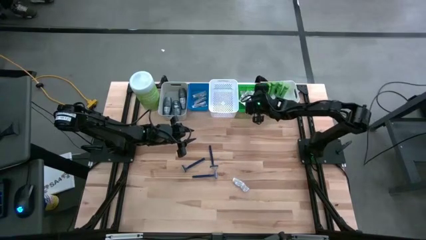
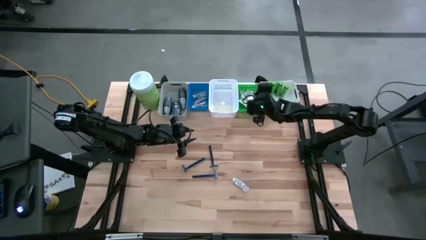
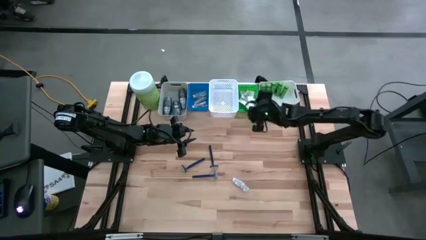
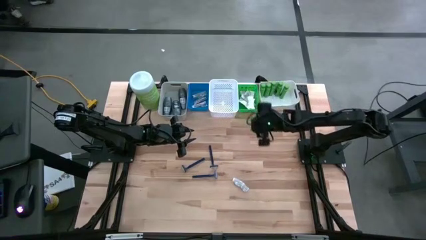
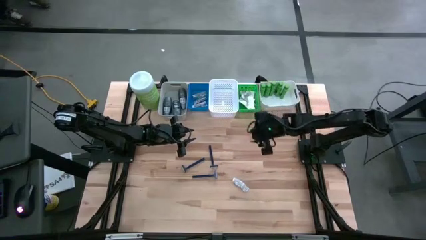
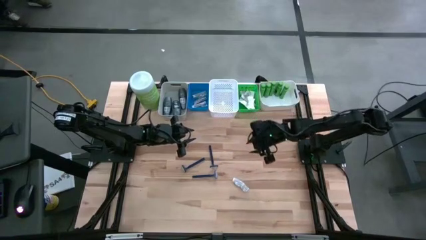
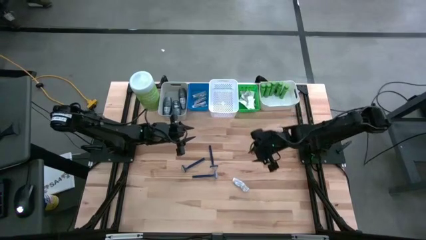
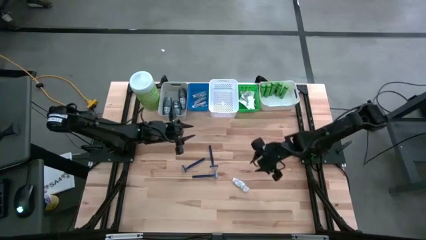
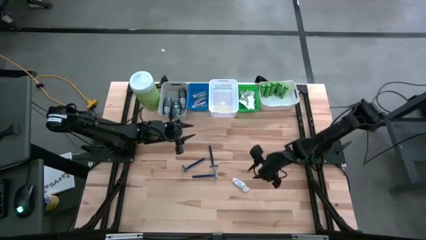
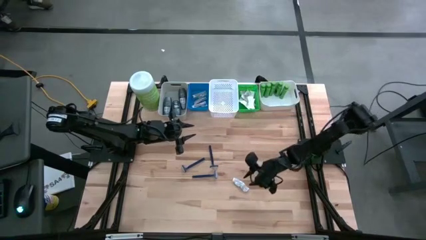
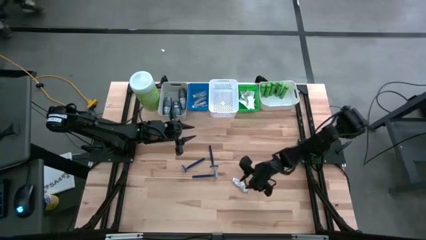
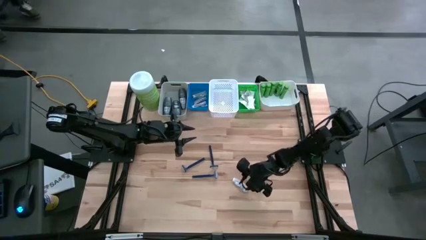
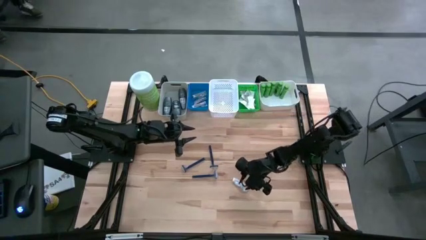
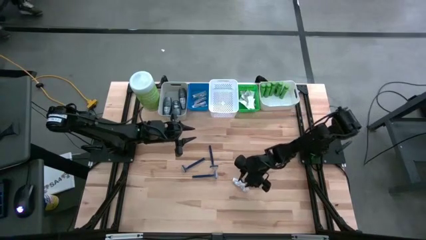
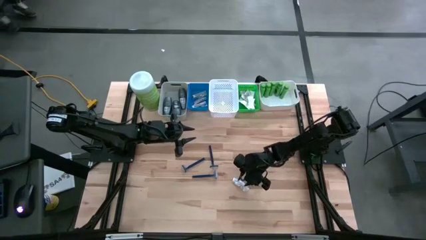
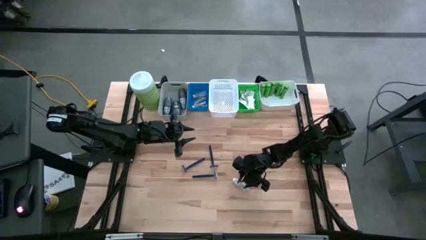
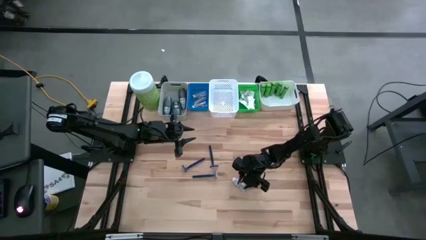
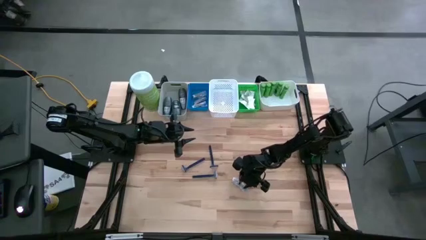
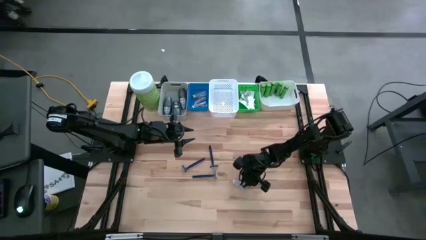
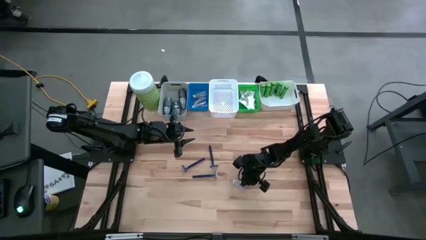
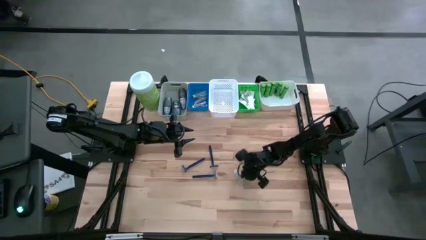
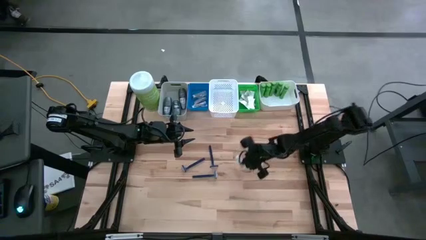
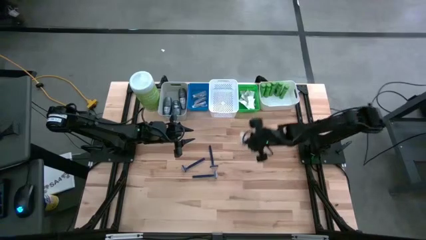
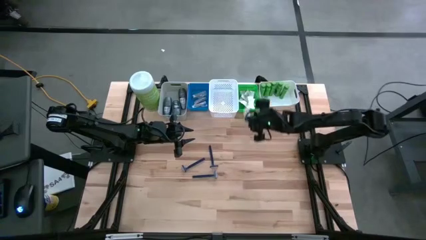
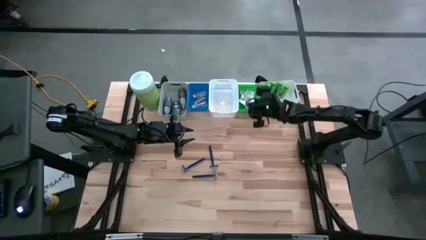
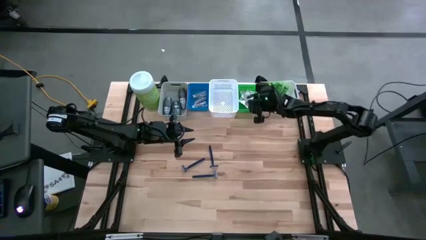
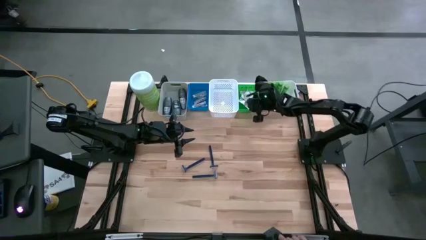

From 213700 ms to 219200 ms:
Task: Pick & Place Travel size toiletries
Put the white bandage pack into the green bin

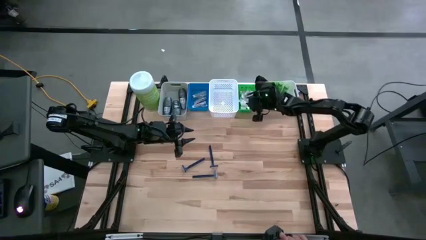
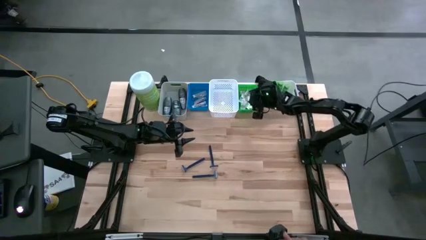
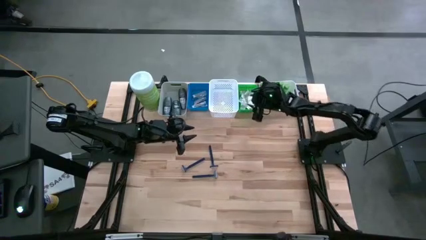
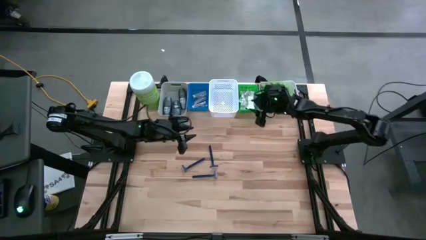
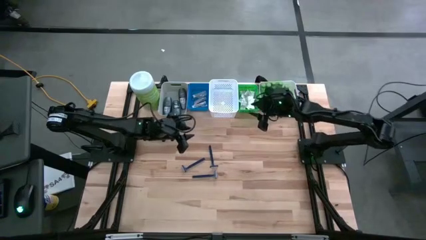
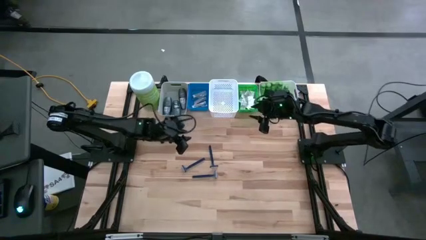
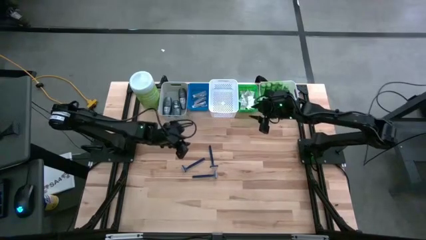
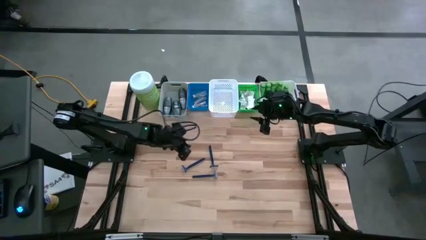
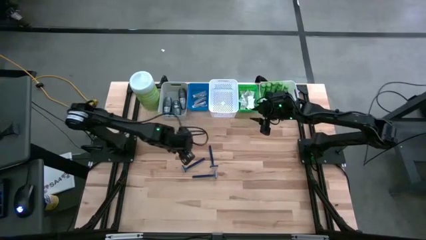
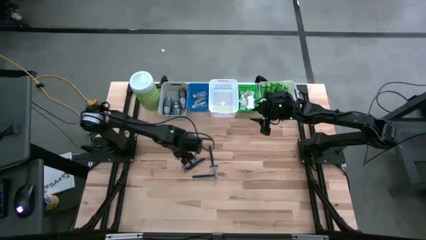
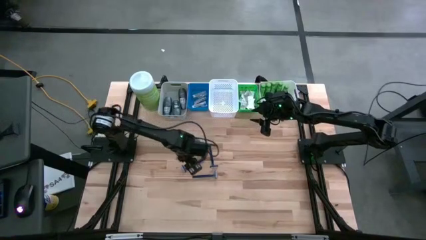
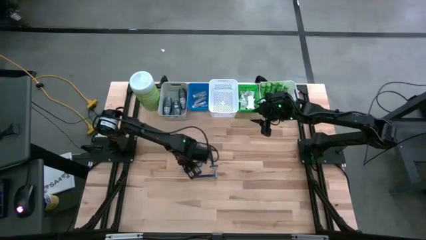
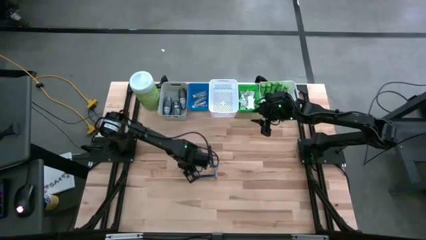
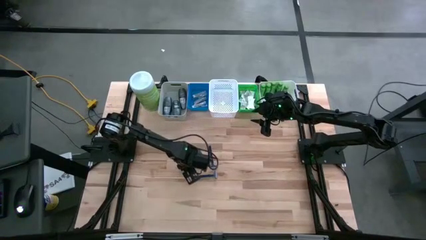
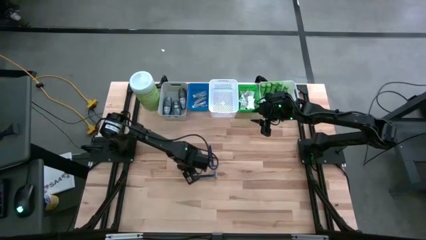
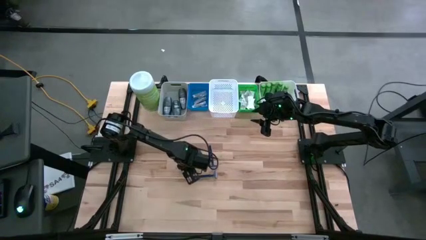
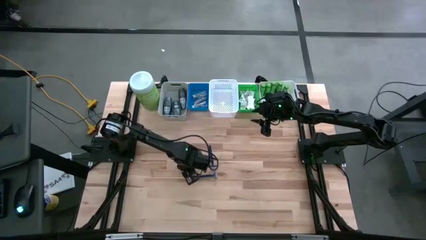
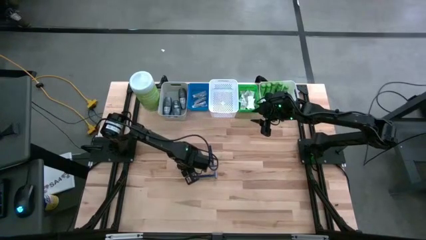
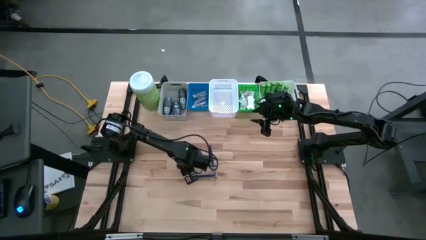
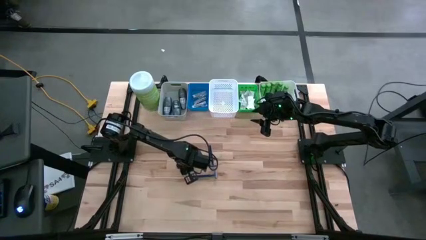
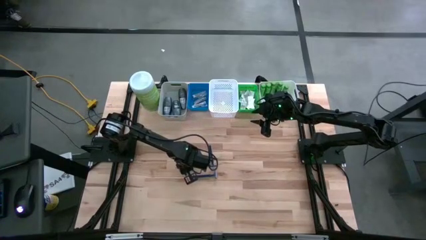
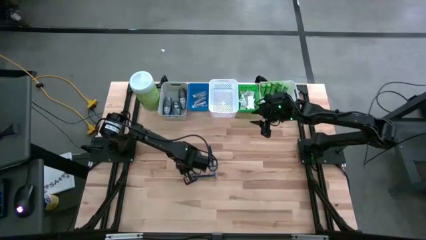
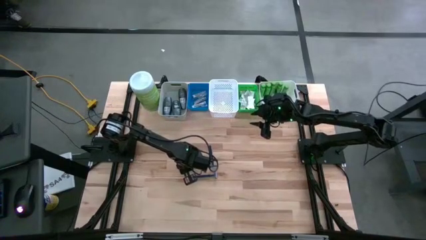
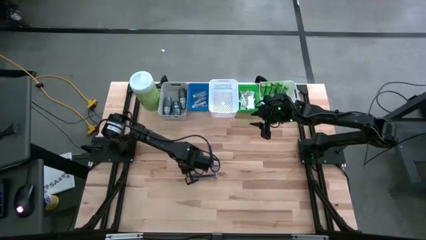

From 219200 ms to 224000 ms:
Put the top left blue razor into the left white bin

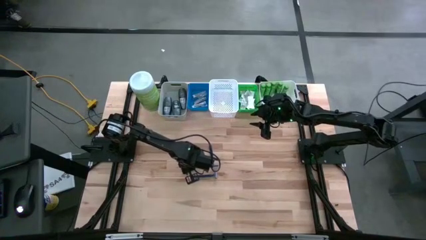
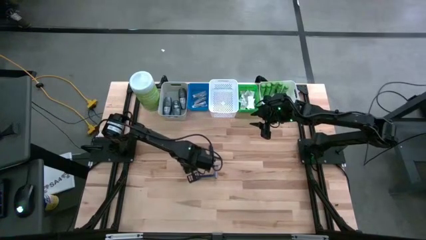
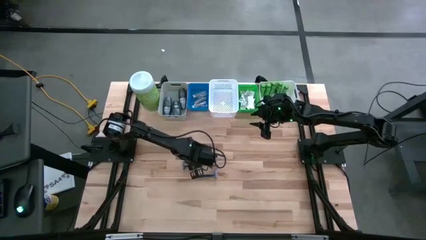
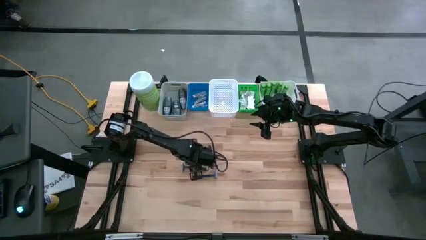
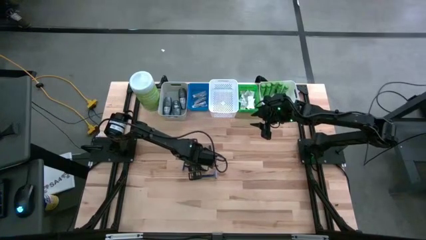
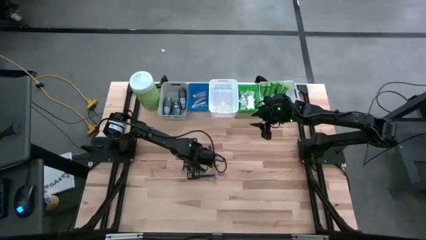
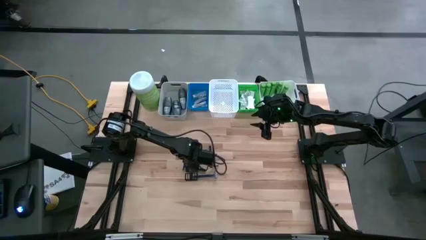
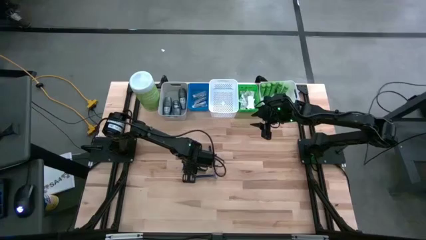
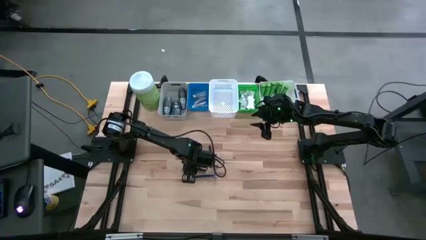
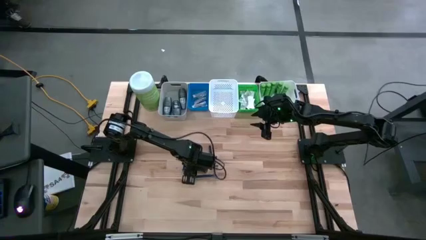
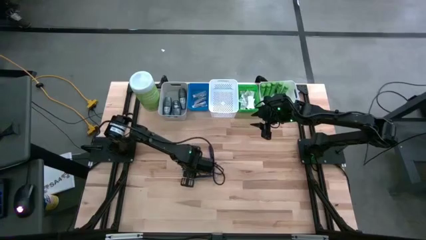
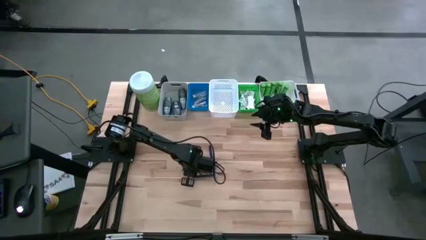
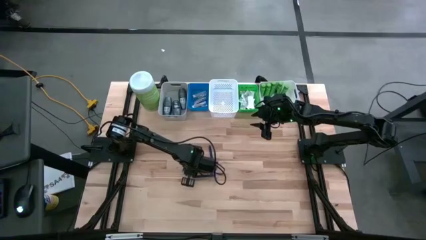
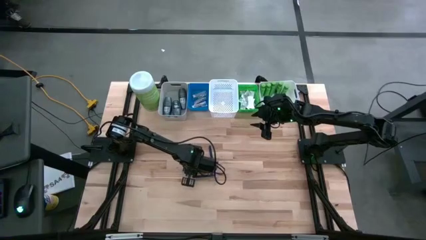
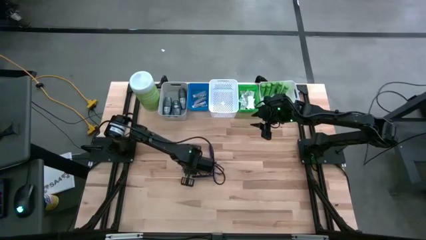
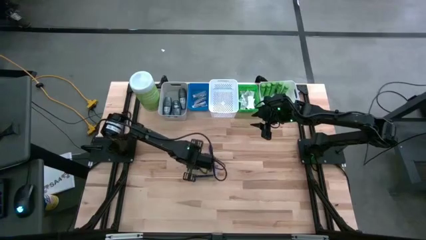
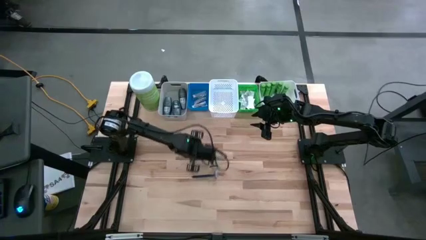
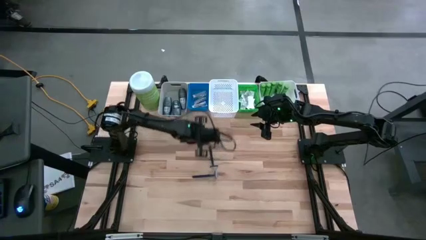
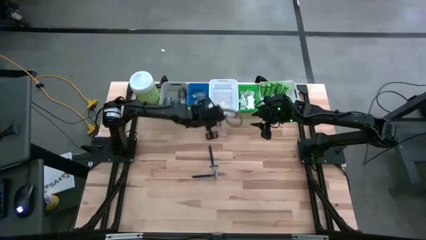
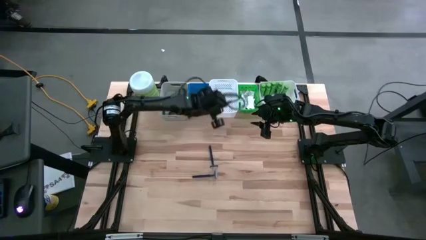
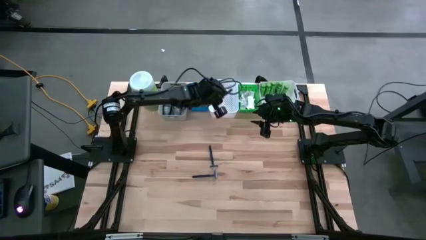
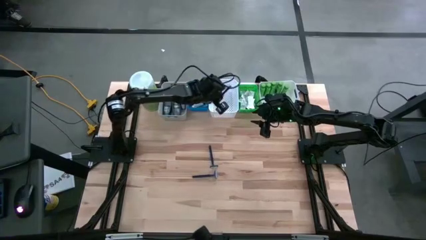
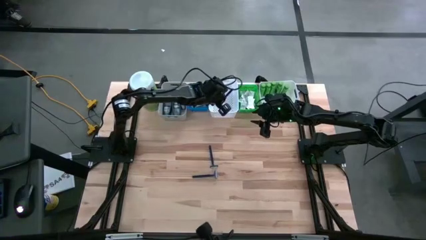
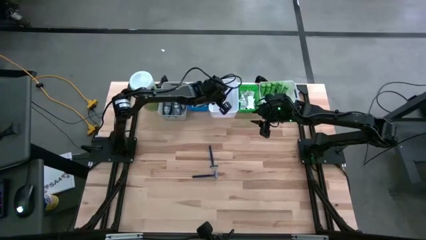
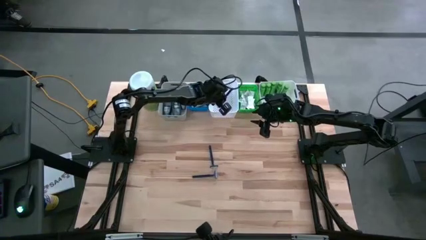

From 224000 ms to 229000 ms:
Put the top left blue razor into the left white bin

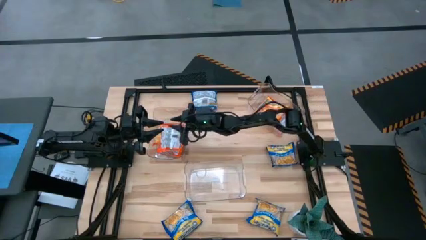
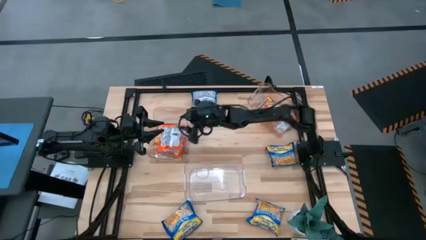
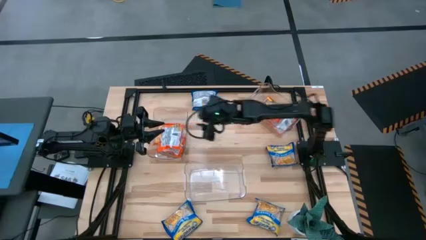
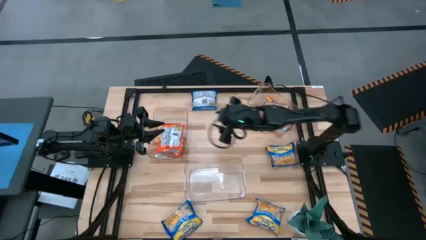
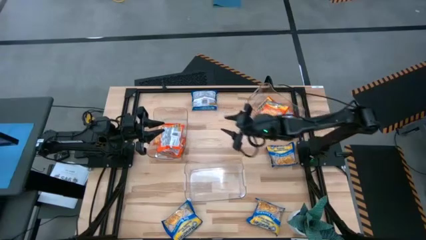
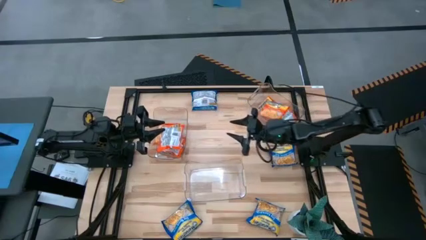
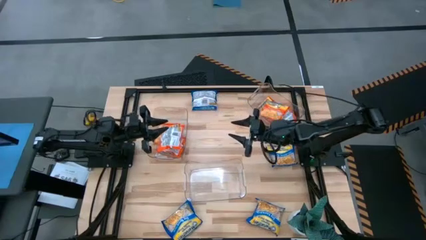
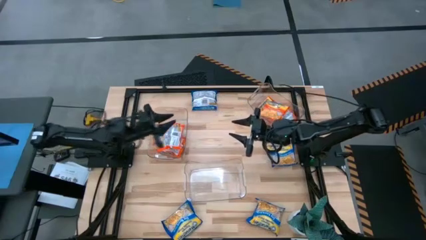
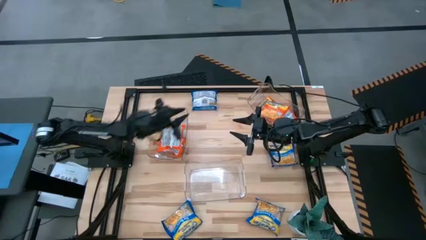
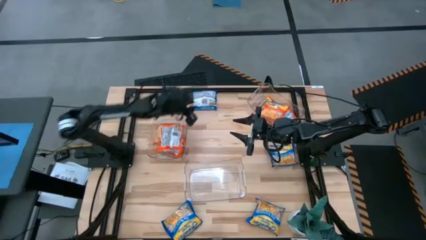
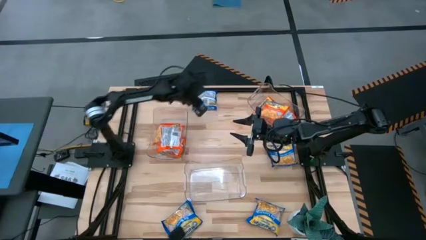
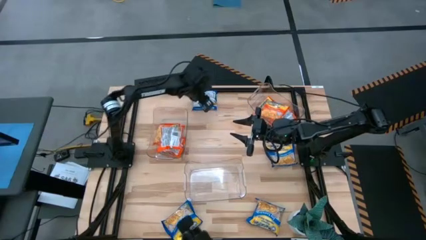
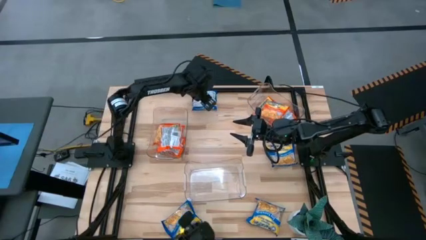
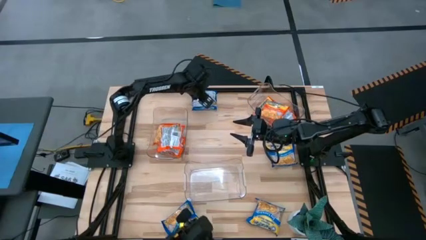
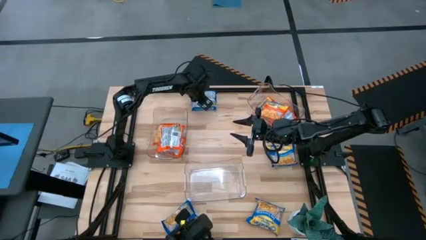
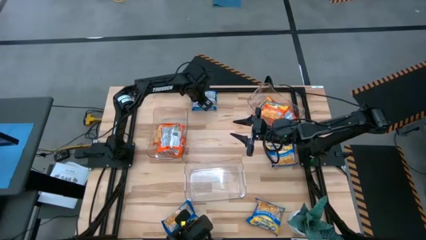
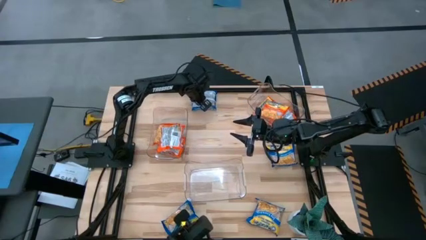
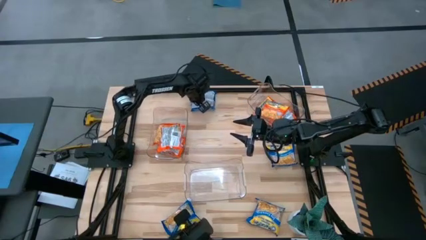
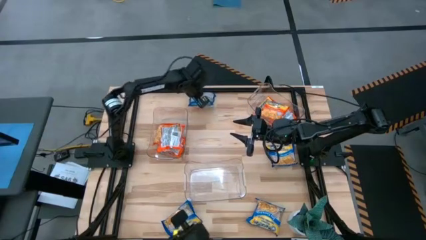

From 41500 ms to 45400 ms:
Task: Sort Maruchan noodles
Put the blue noodle pack into the bottom transparent bin
